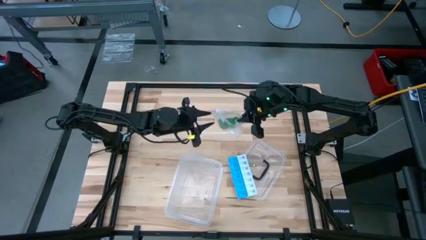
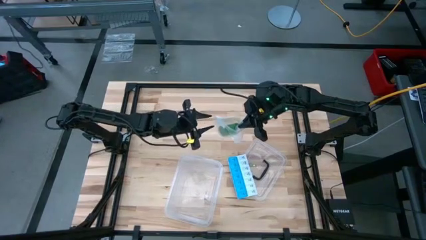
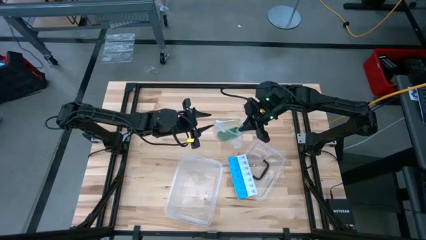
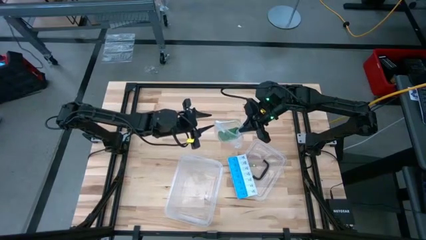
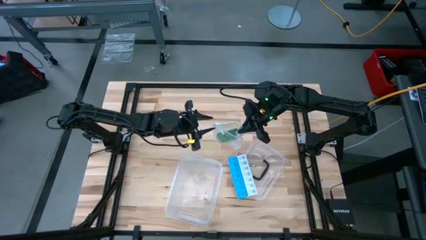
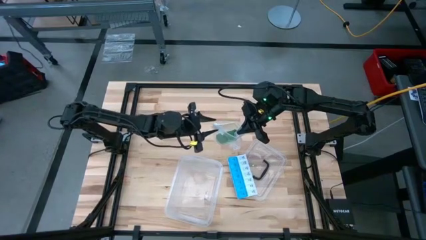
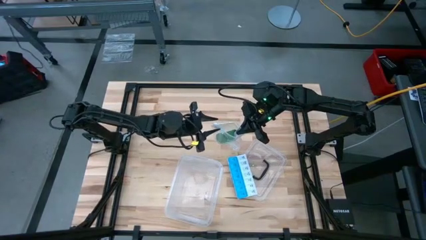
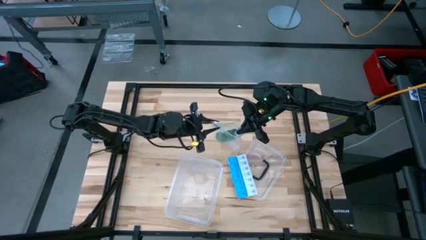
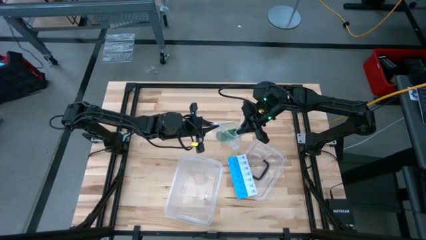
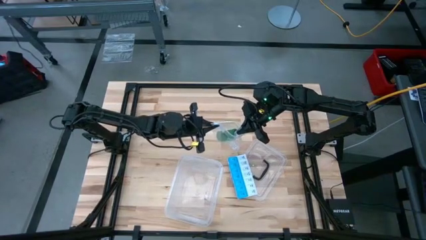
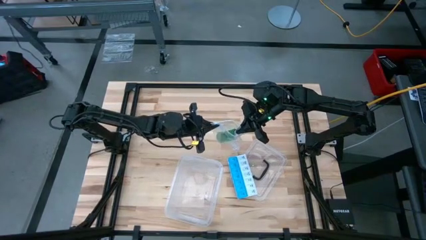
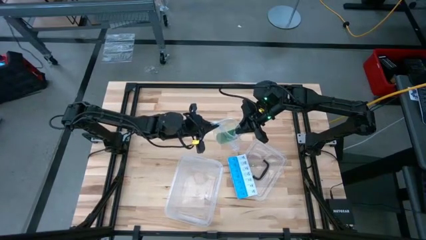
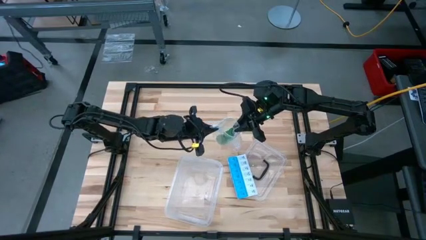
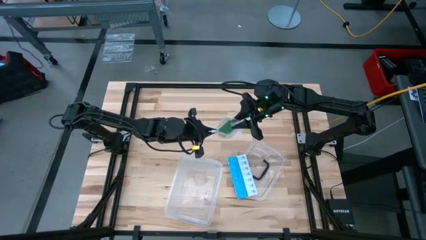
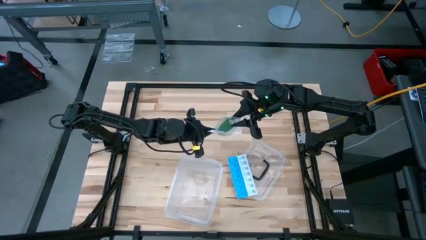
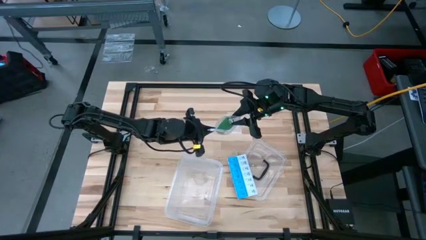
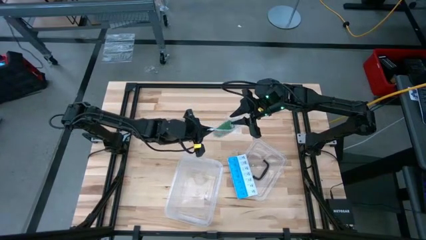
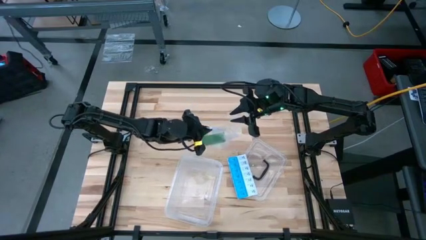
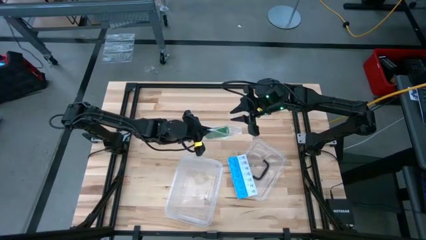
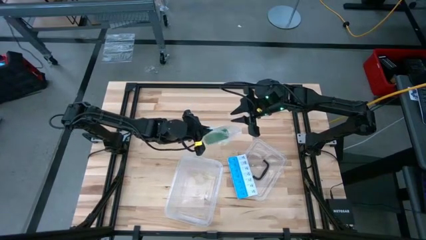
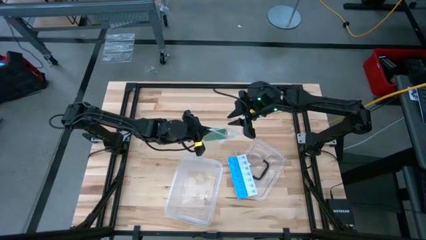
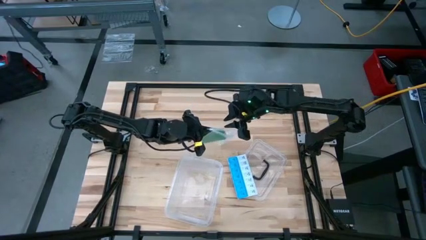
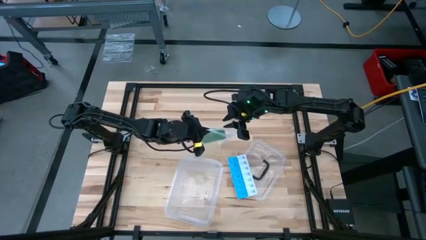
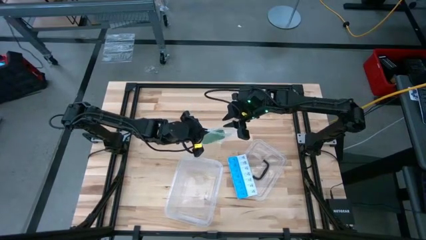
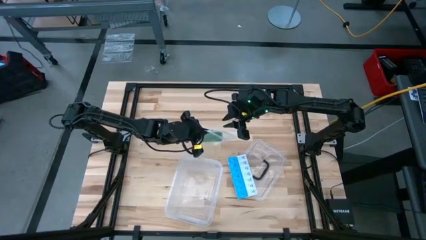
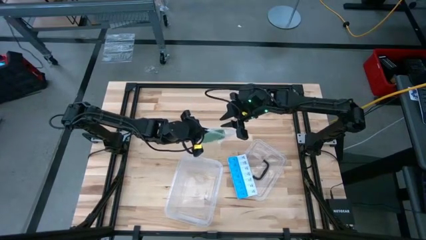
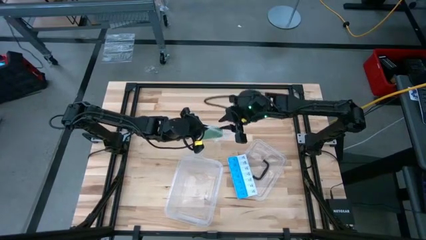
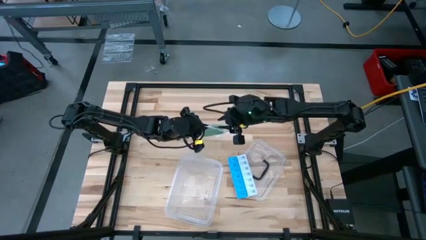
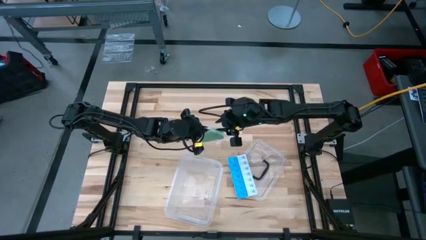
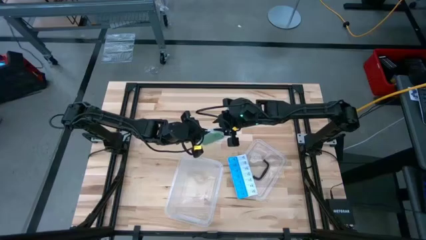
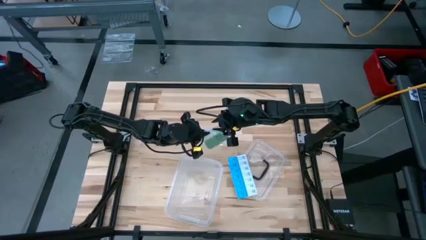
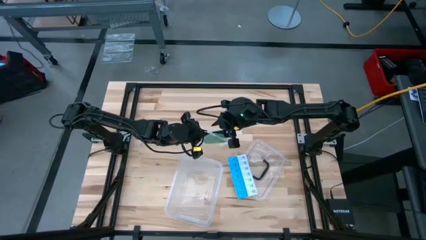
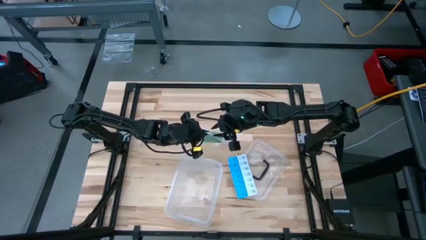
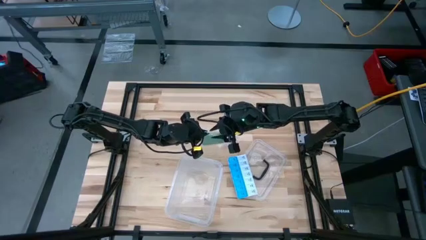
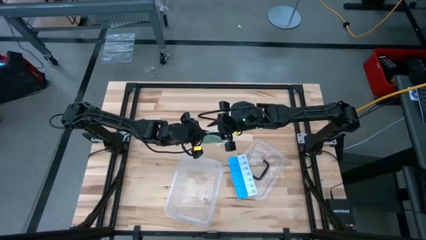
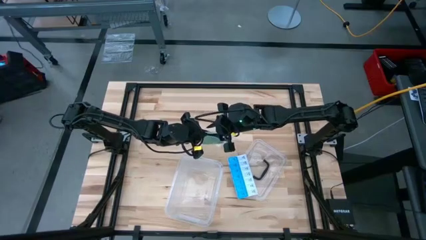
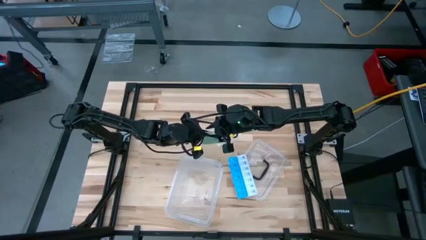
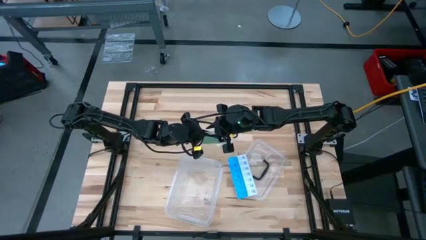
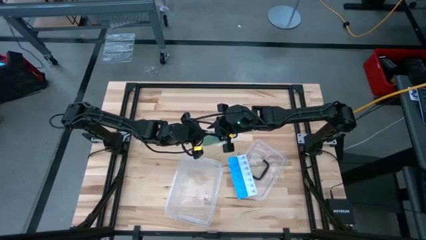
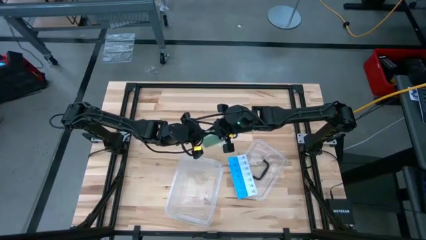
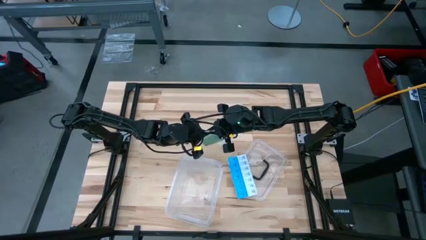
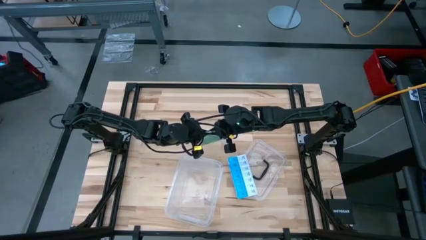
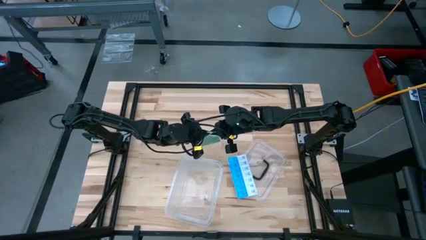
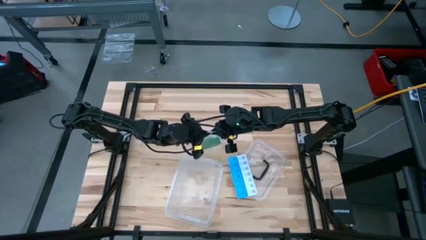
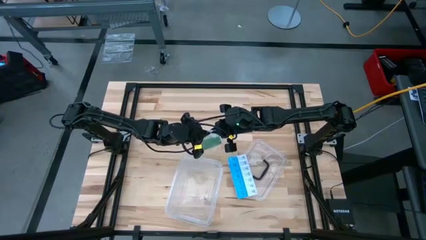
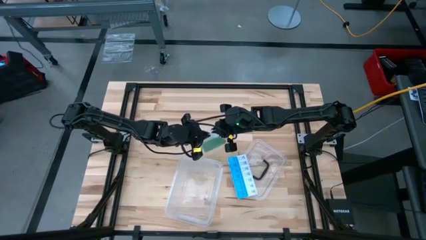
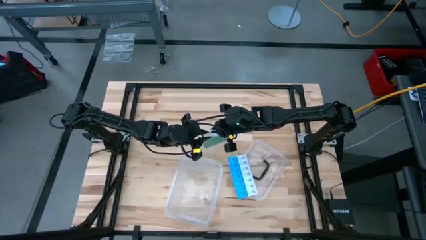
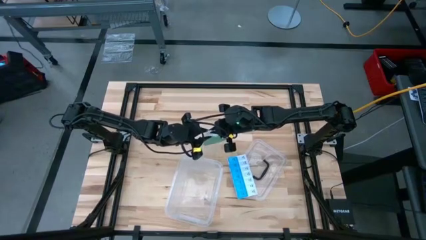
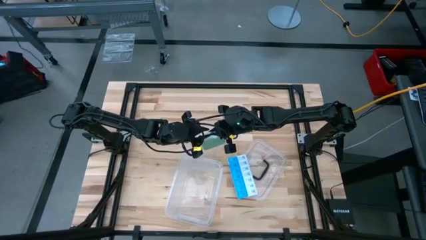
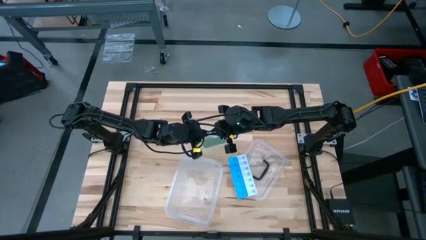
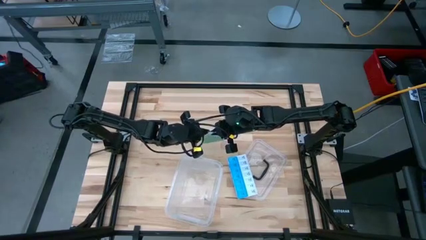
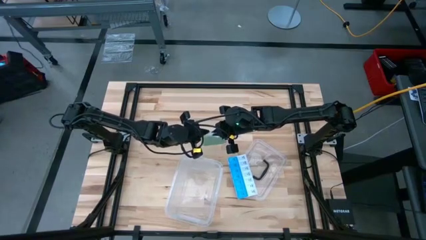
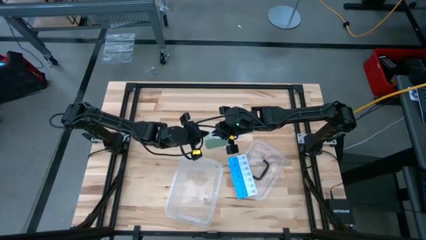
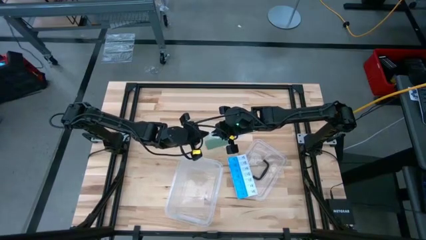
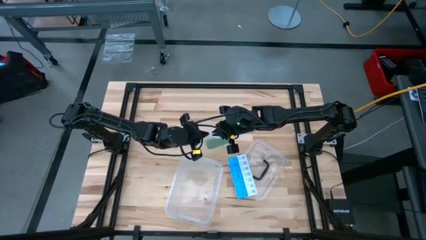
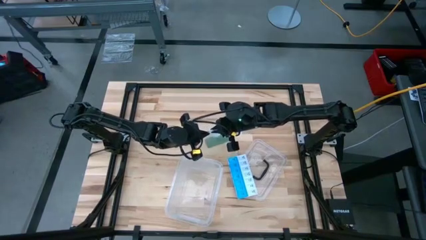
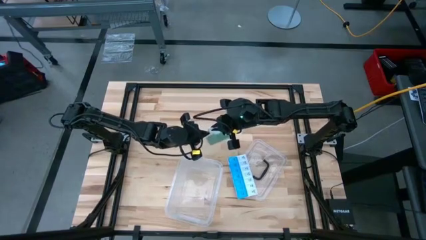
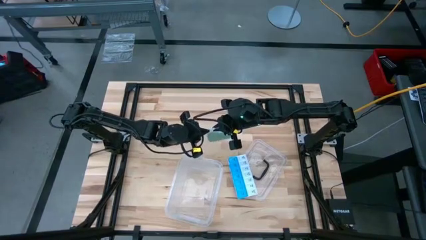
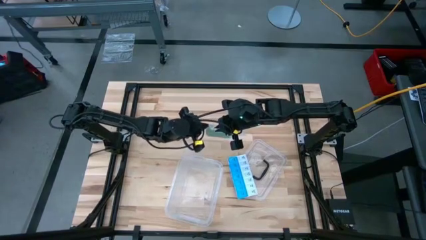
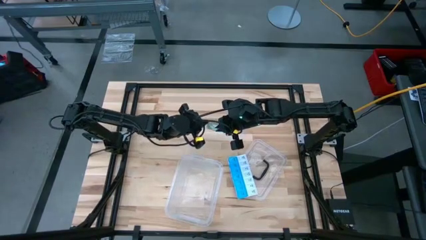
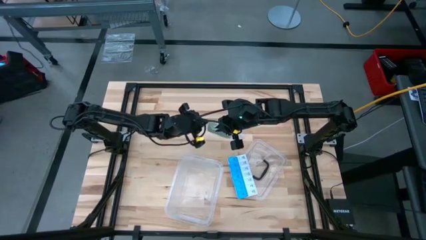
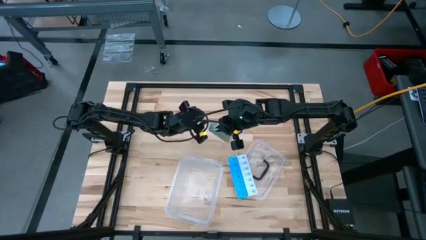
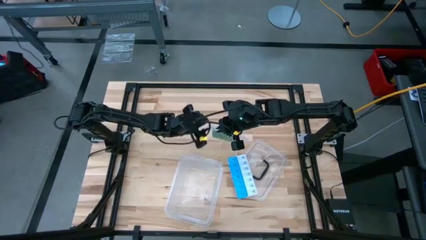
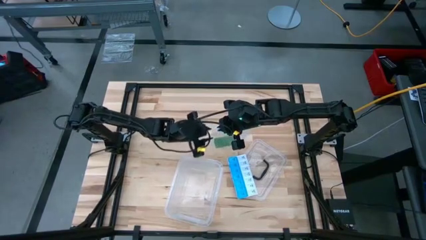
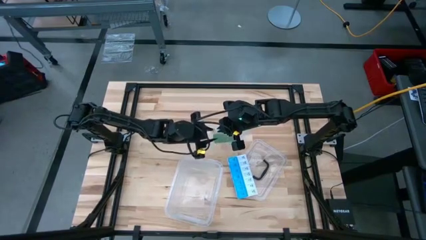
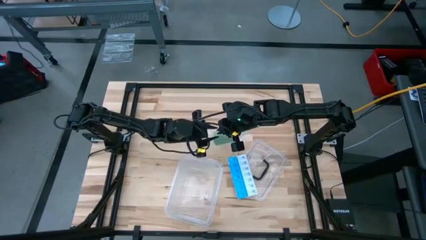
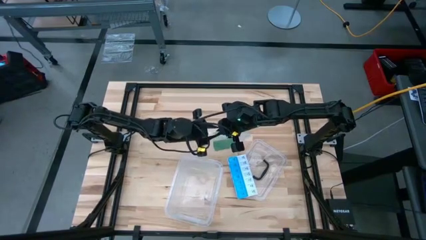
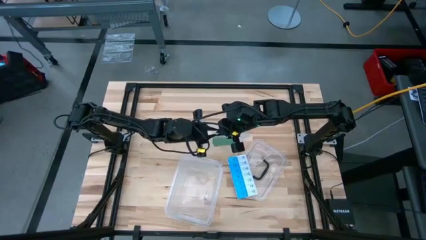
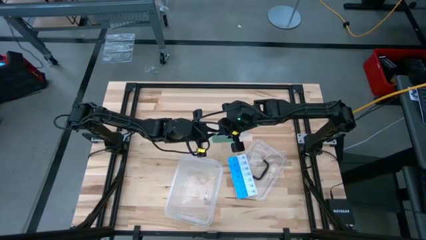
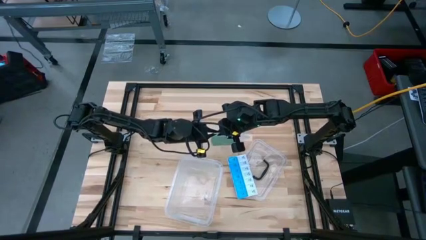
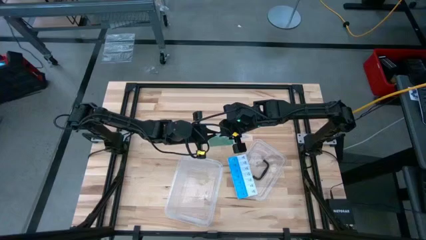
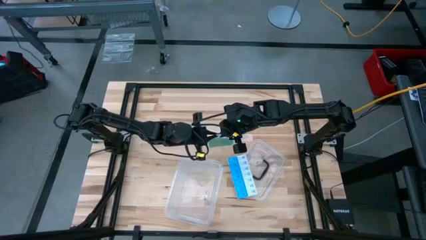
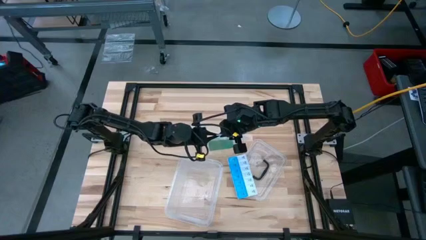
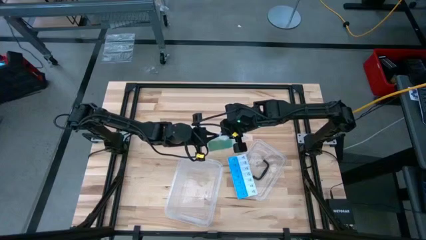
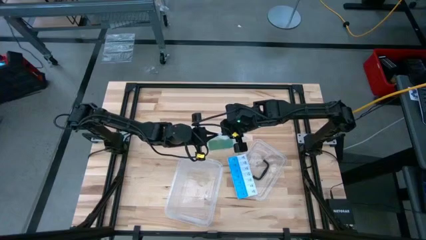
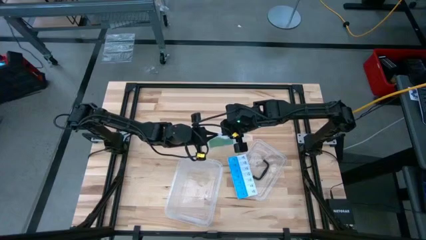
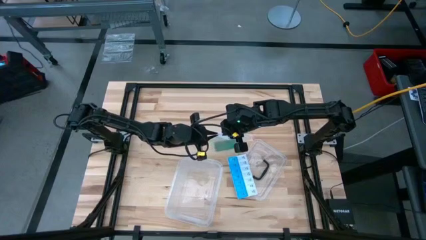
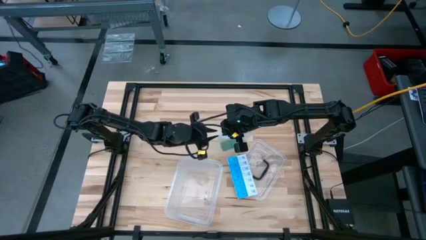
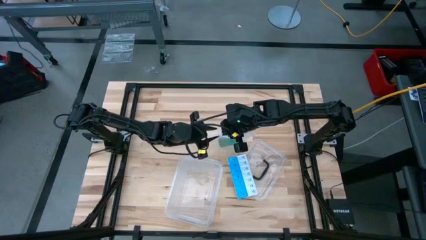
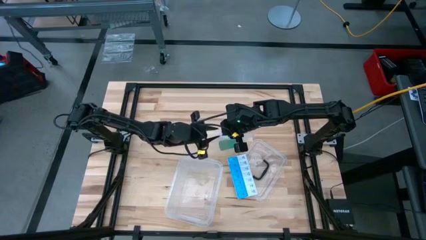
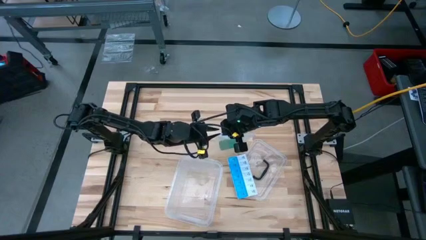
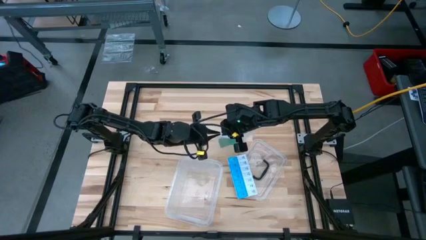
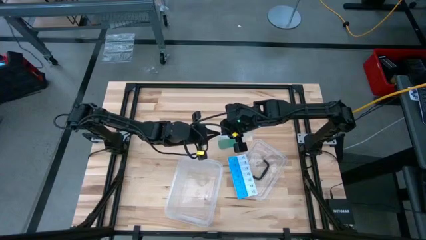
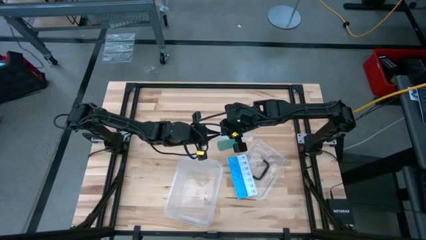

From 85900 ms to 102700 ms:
Task: Roll bandage
Close the transparent zip bag
